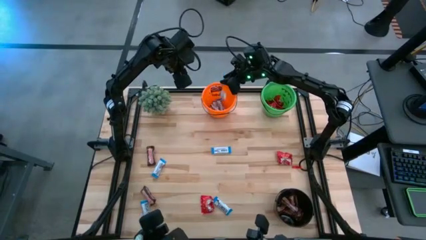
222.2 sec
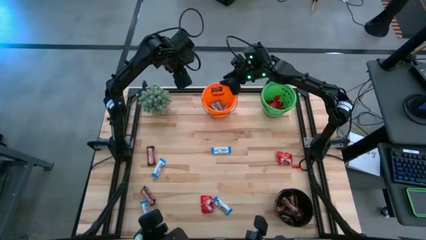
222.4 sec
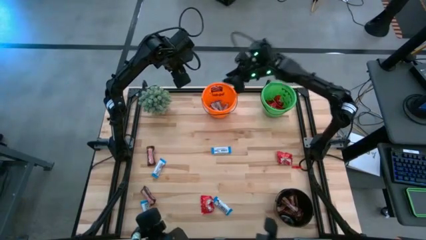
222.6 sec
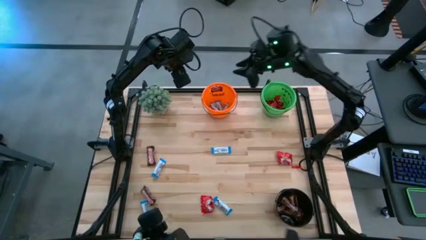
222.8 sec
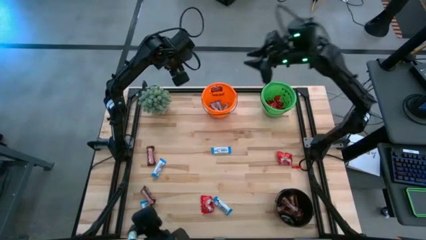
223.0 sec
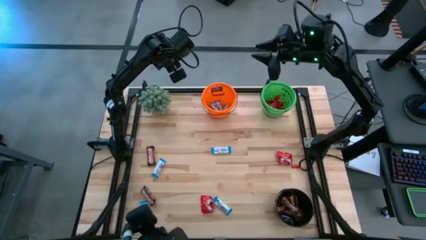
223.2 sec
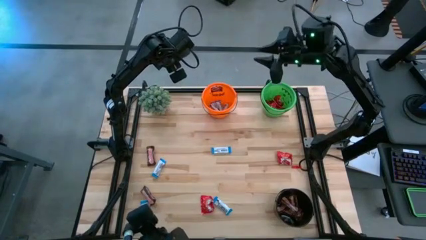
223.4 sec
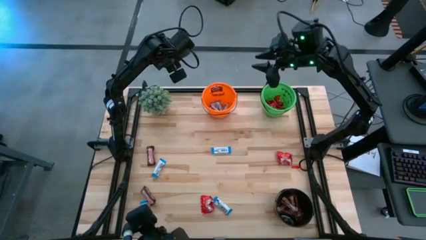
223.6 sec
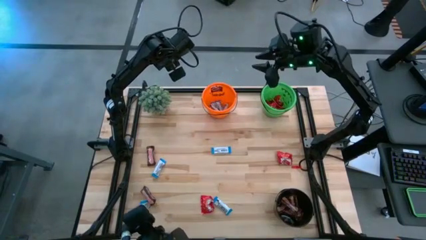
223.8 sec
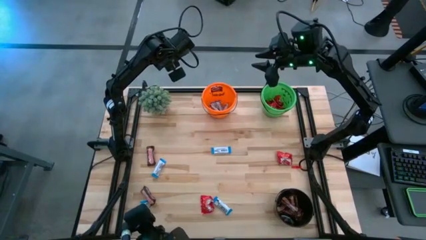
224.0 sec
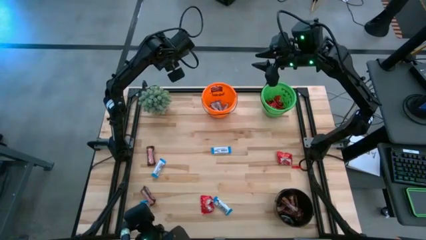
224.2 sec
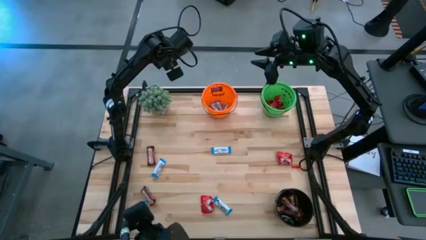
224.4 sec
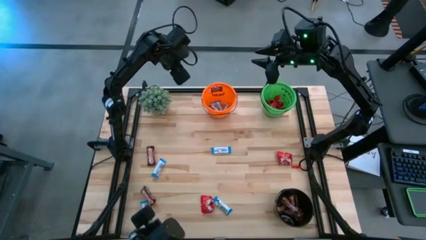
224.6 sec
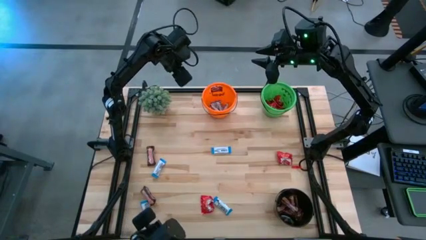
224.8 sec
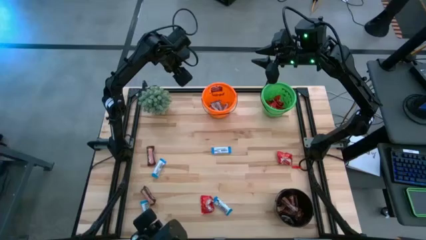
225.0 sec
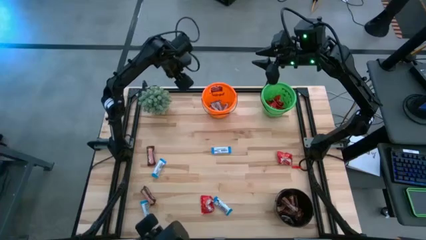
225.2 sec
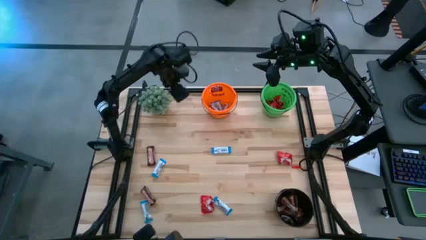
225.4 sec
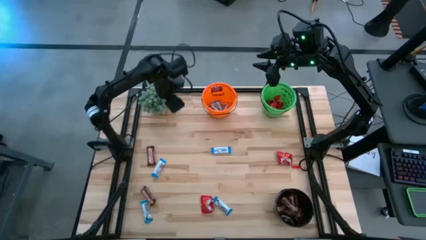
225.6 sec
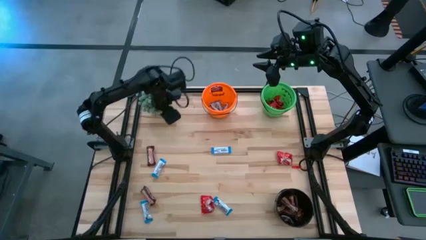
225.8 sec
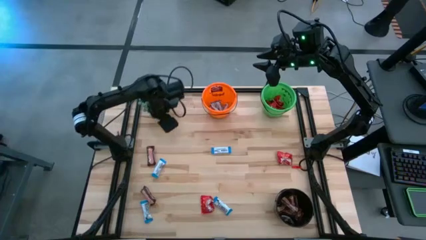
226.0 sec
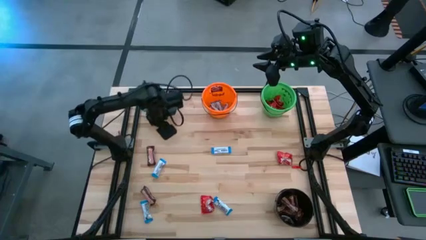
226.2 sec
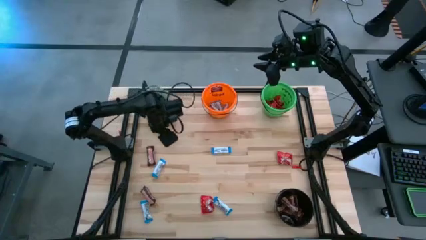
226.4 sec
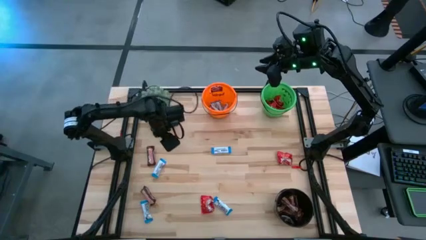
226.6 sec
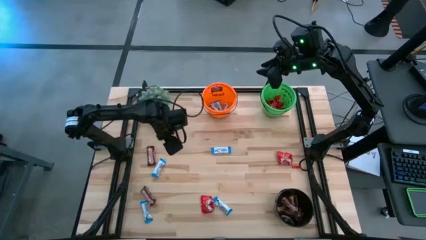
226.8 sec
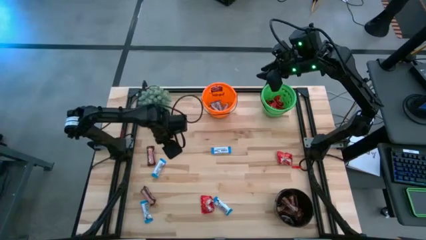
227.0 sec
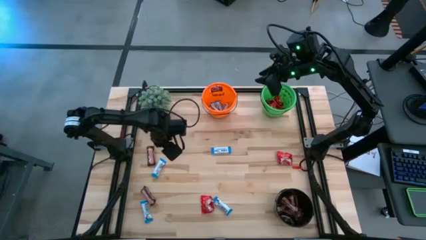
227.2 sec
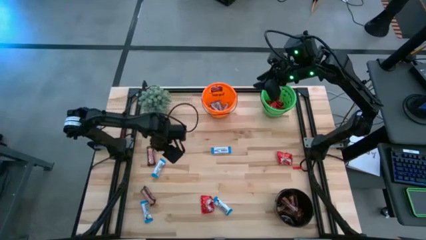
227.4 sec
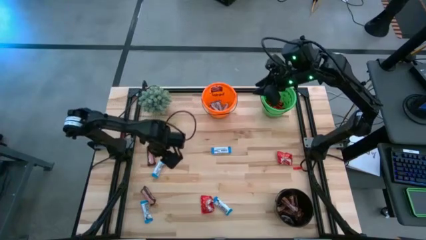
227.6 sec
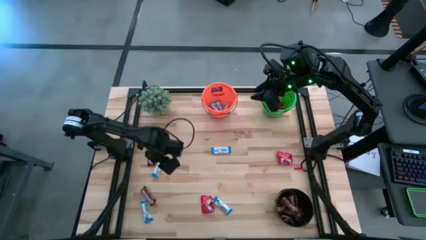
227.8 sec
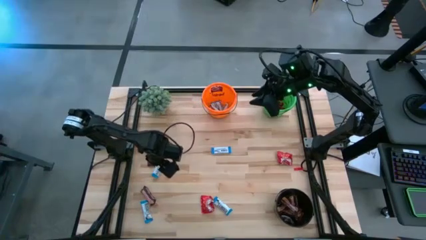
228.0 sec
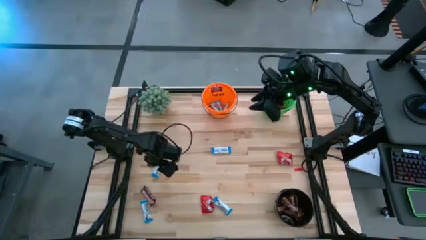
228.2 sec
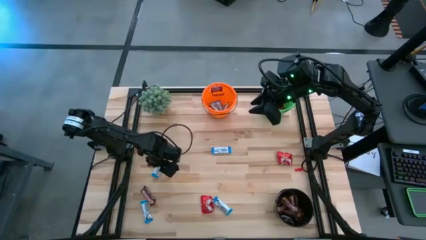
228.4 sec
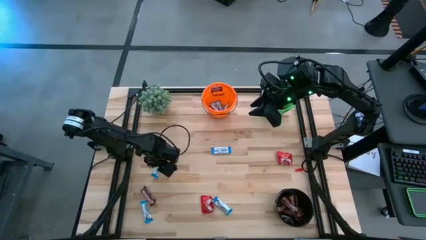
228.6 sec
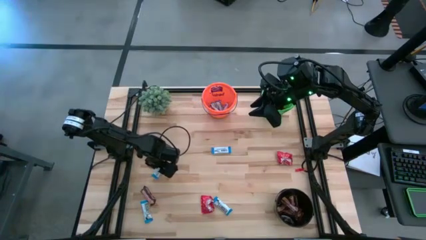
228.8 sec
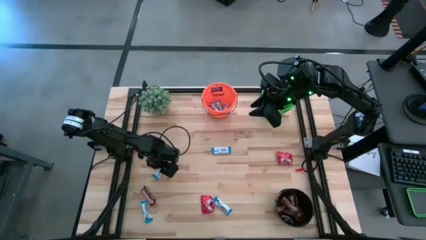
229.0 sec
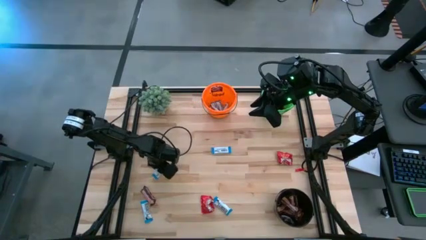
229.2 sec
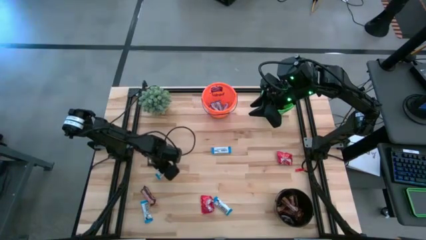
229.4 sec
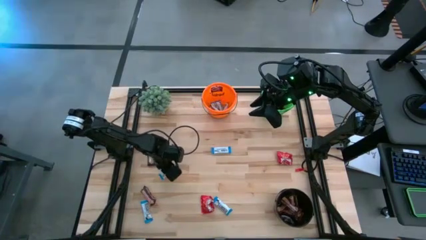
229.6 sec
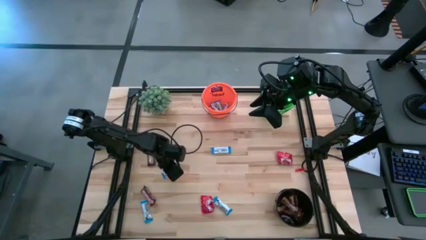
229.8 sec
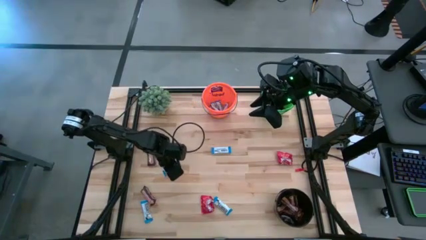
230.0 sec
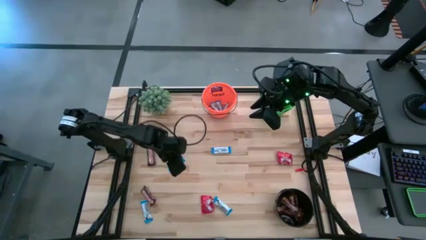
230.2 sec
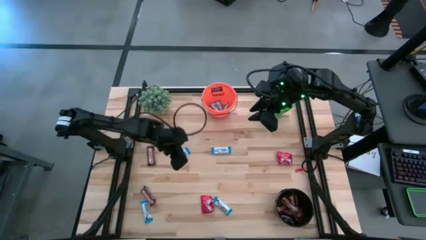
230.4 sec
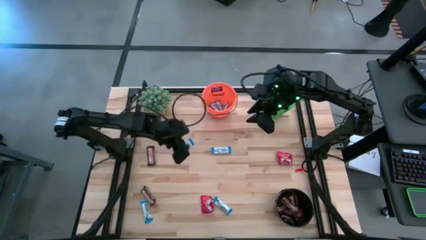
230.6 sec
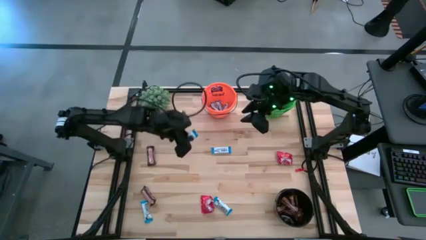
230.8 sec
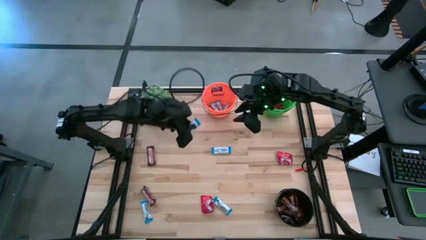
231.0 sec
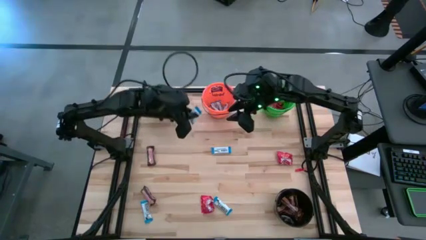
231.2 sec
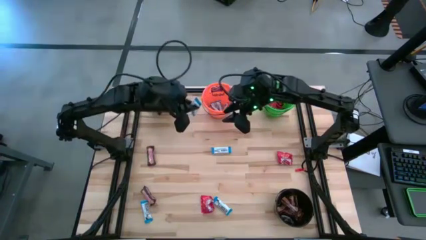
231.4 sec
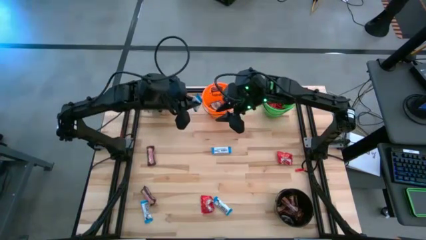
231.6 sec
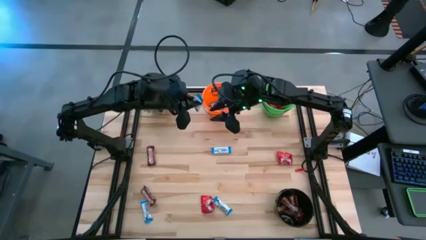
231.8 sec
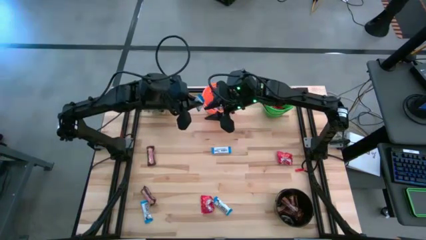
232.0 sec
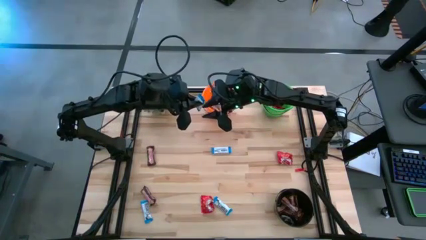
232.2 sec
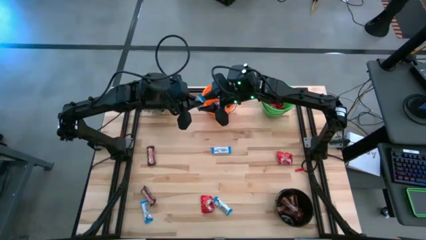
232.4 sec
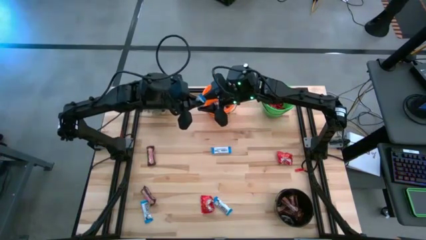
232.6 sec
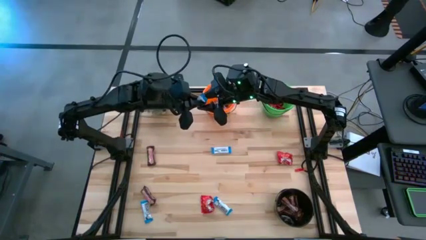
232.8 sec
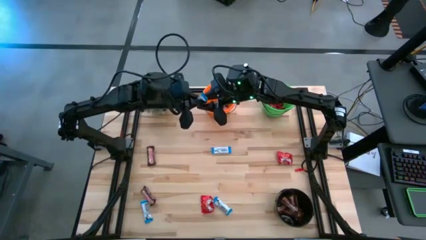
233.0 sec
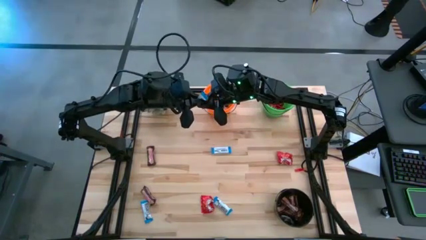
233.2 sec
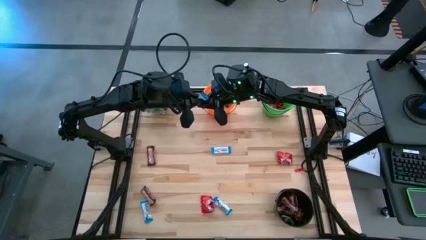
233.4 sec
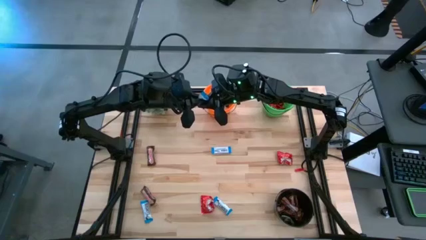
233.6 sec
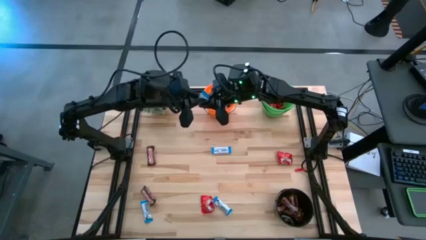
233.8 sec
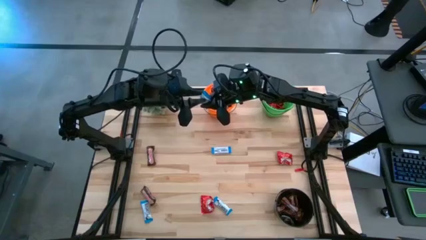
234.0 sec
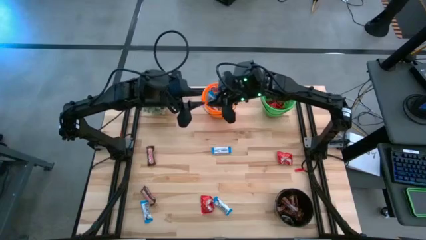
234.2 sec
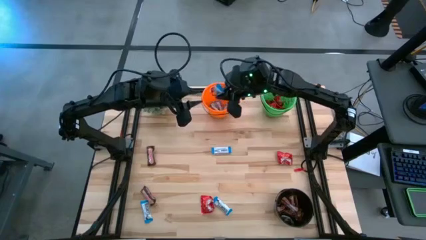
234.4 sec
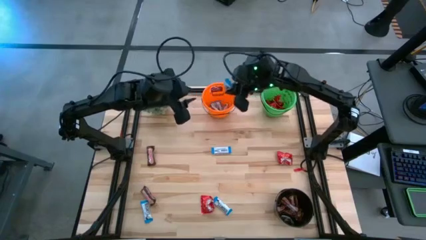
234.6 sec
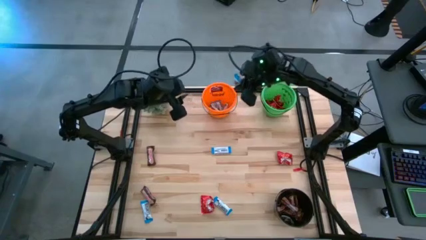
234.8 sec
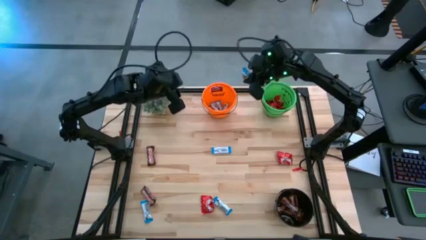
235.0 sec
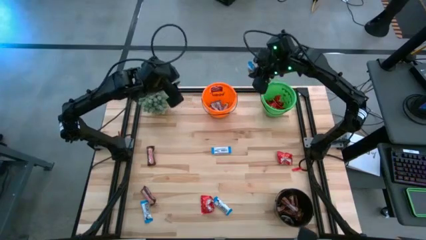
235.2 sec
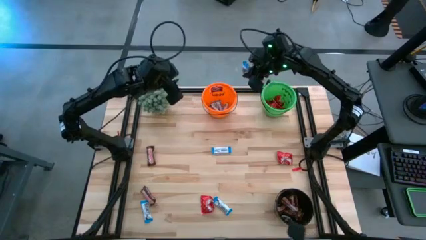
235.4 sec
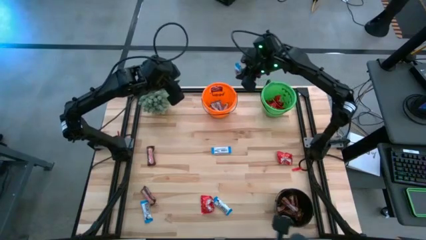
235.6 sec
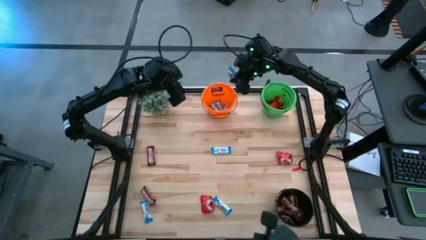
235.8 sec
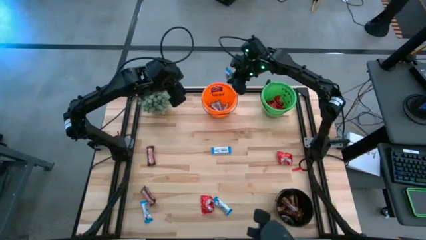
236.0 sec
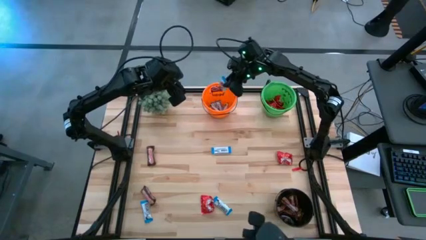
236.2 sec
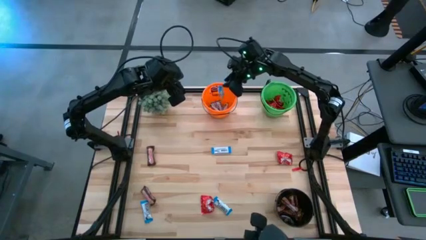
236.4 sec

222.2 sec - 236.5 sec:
Task: Organize candy in baskets
Put the white chocolate bar into the orange bucket
